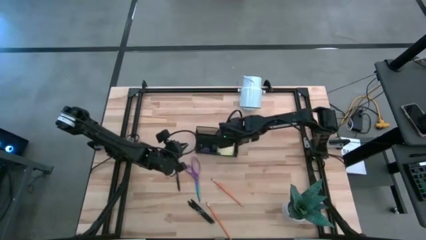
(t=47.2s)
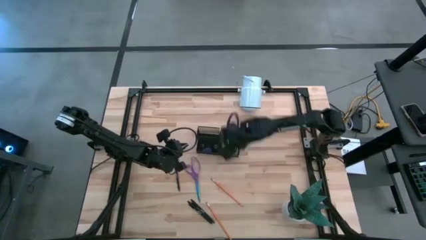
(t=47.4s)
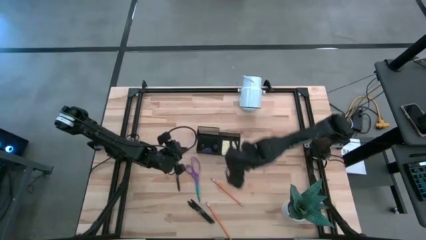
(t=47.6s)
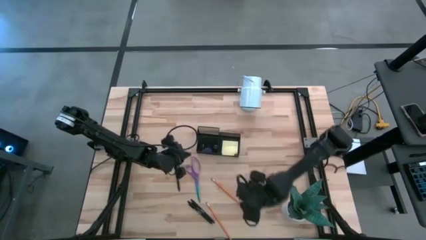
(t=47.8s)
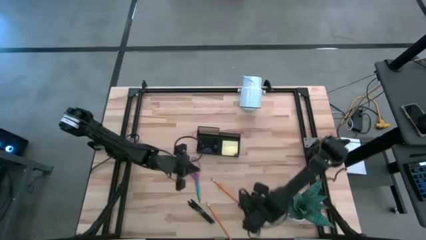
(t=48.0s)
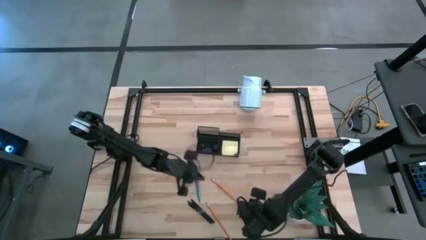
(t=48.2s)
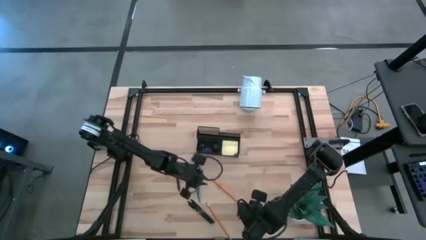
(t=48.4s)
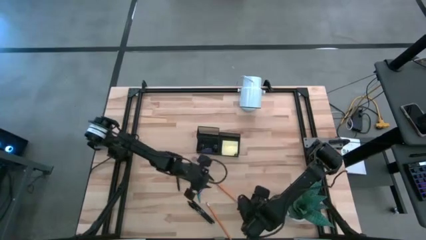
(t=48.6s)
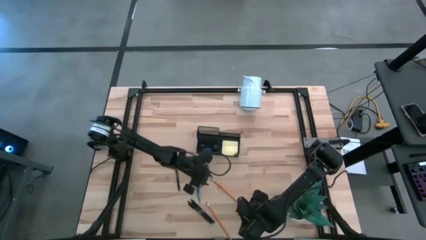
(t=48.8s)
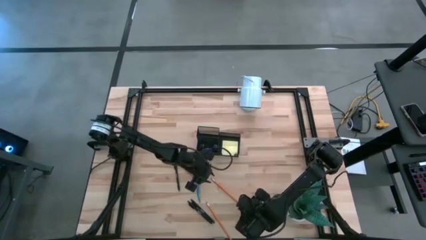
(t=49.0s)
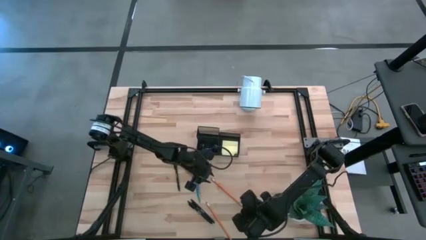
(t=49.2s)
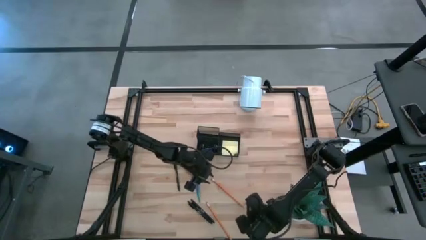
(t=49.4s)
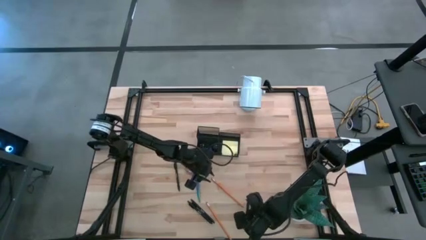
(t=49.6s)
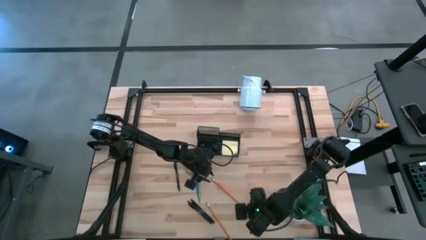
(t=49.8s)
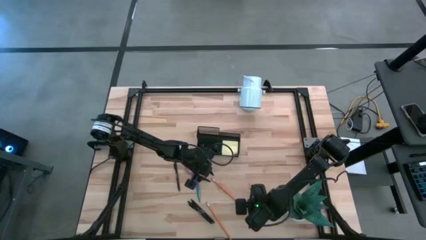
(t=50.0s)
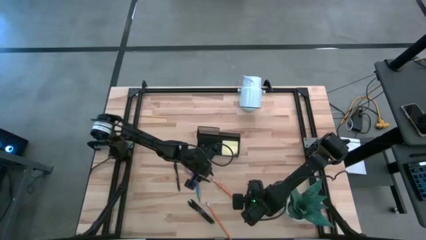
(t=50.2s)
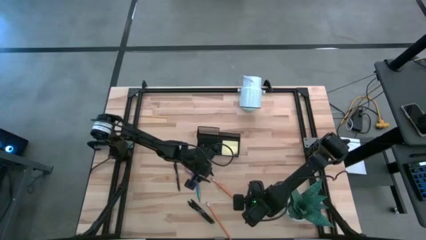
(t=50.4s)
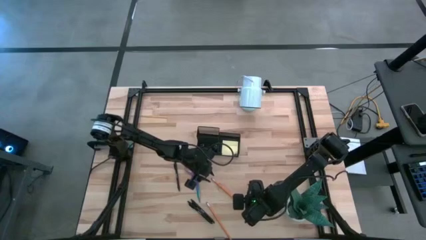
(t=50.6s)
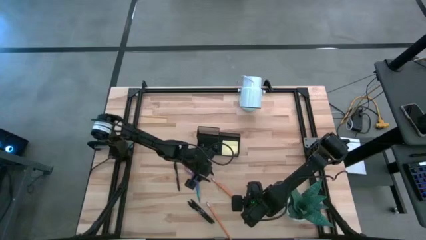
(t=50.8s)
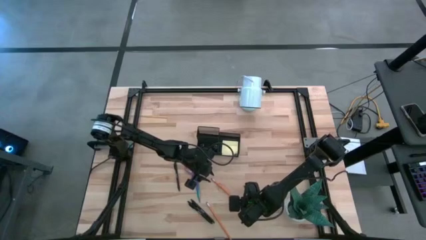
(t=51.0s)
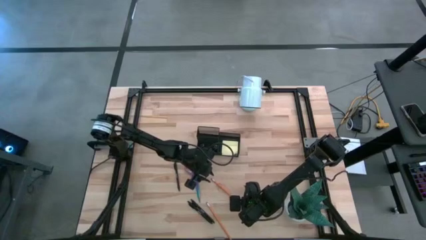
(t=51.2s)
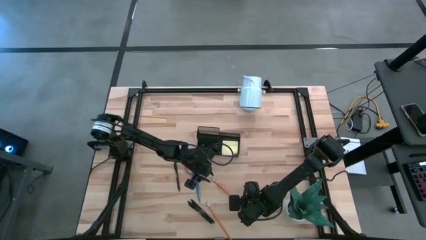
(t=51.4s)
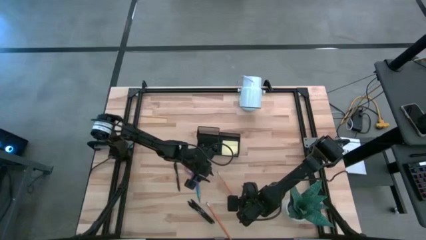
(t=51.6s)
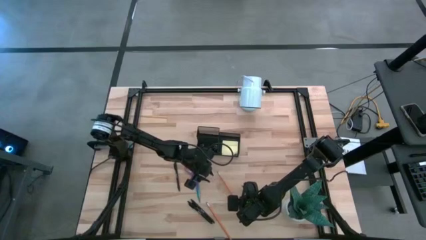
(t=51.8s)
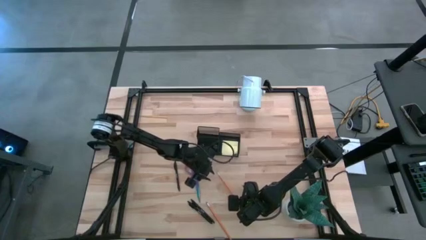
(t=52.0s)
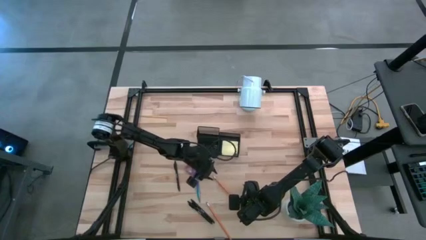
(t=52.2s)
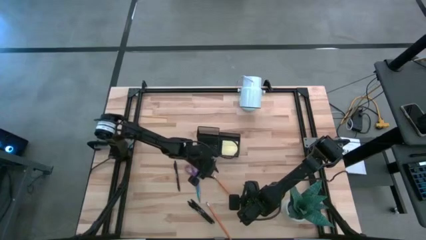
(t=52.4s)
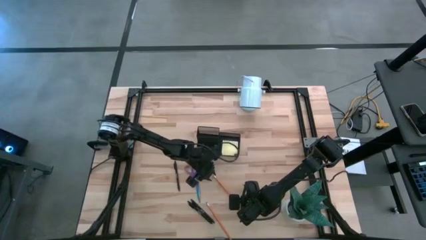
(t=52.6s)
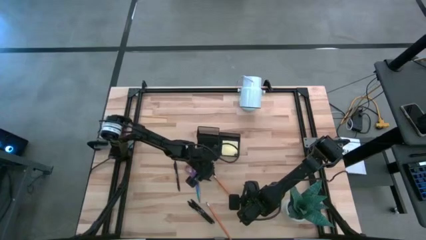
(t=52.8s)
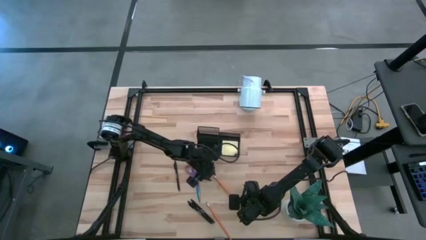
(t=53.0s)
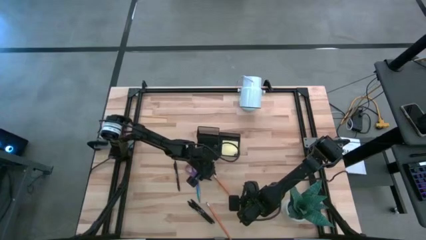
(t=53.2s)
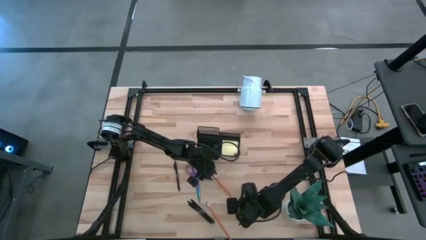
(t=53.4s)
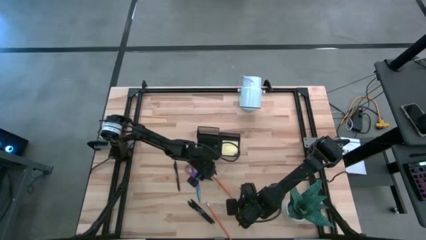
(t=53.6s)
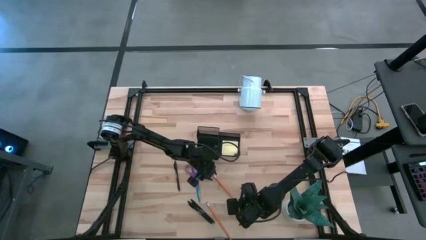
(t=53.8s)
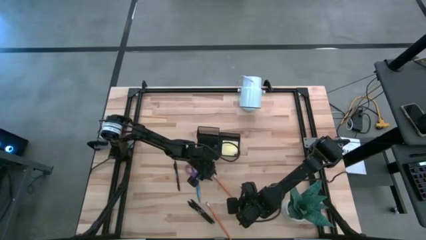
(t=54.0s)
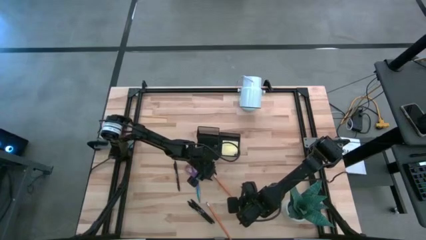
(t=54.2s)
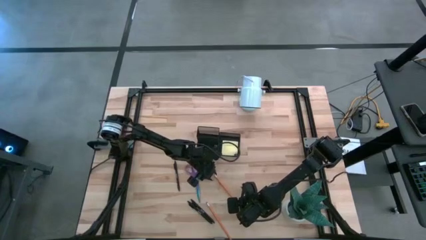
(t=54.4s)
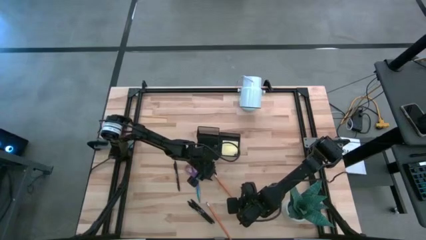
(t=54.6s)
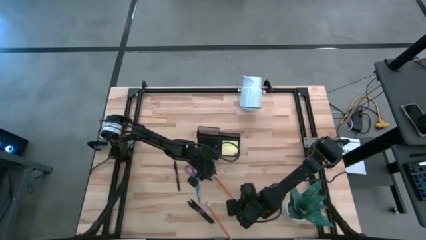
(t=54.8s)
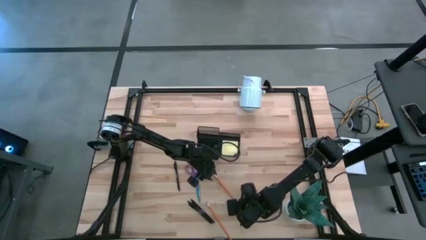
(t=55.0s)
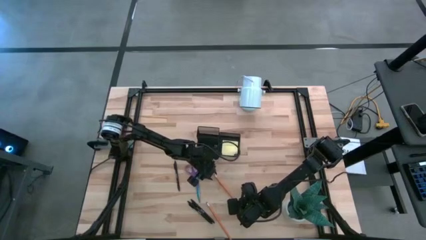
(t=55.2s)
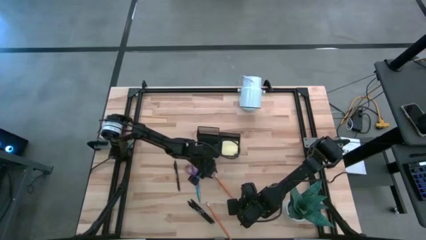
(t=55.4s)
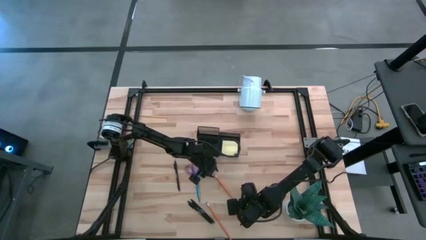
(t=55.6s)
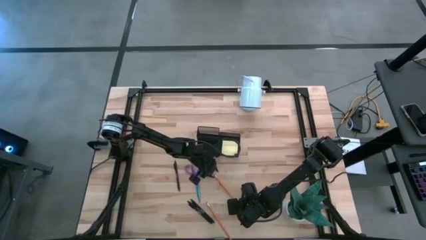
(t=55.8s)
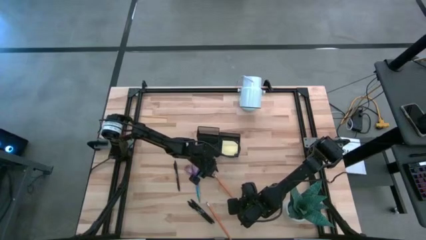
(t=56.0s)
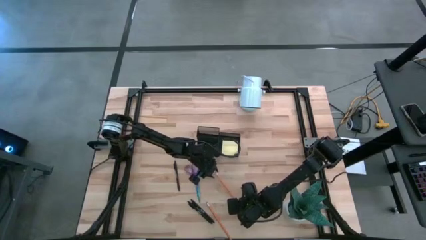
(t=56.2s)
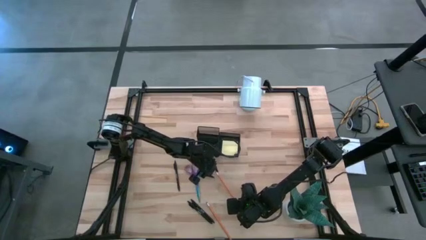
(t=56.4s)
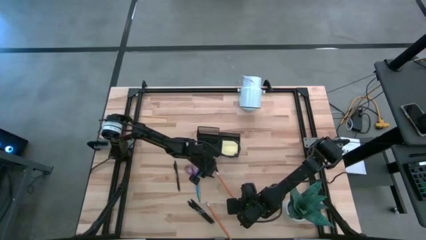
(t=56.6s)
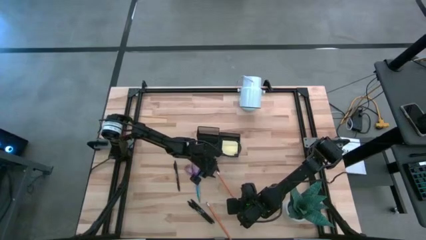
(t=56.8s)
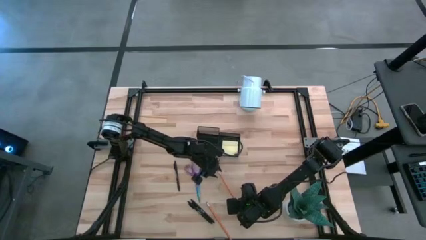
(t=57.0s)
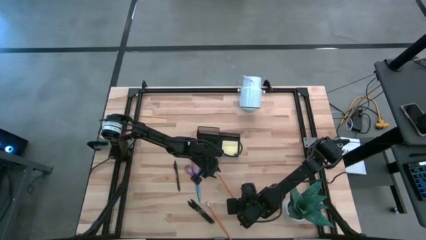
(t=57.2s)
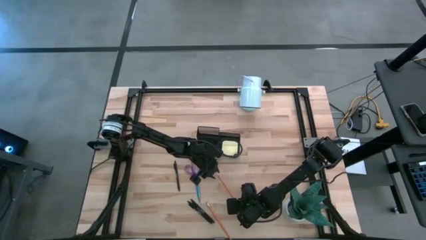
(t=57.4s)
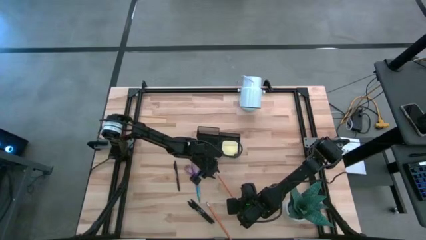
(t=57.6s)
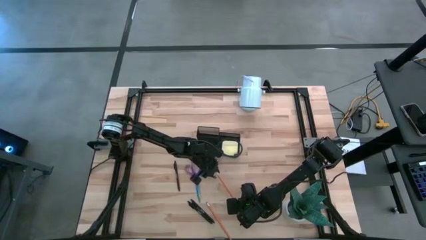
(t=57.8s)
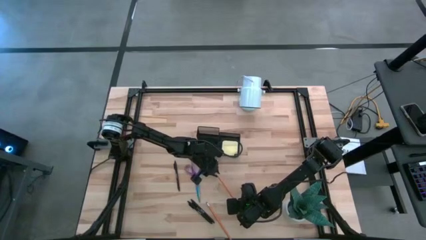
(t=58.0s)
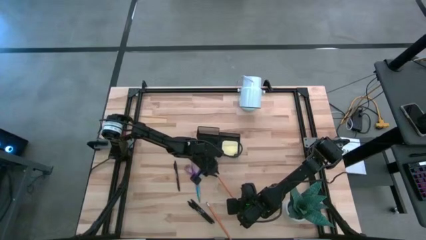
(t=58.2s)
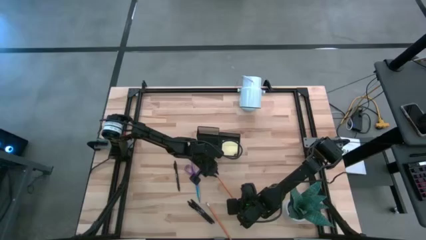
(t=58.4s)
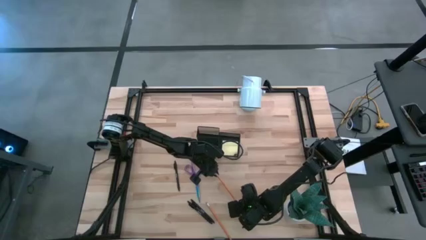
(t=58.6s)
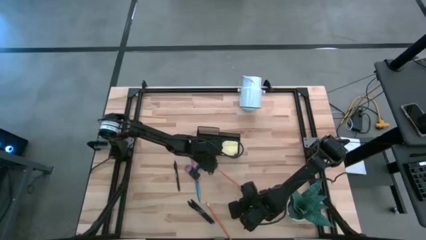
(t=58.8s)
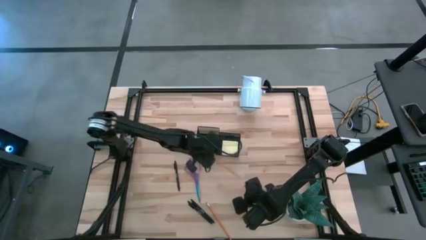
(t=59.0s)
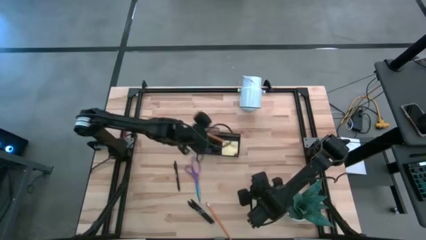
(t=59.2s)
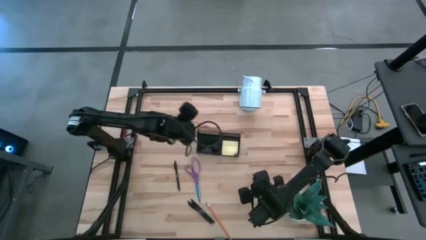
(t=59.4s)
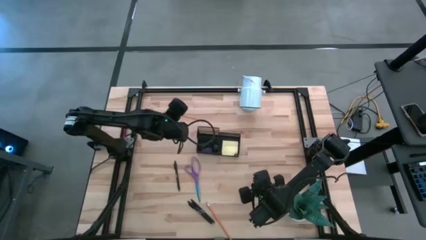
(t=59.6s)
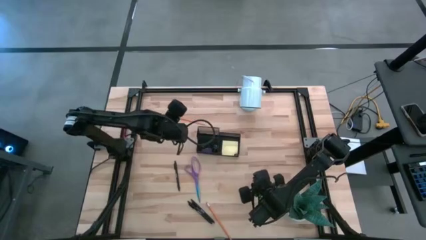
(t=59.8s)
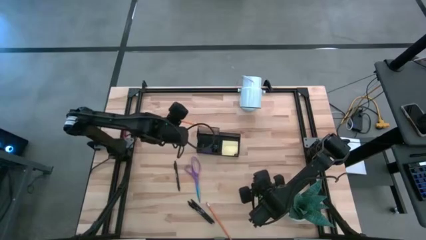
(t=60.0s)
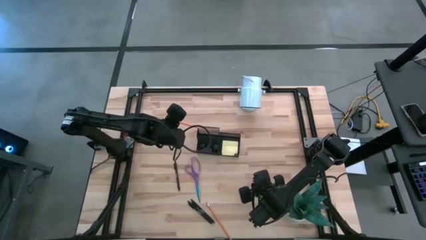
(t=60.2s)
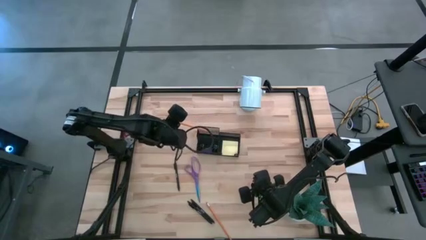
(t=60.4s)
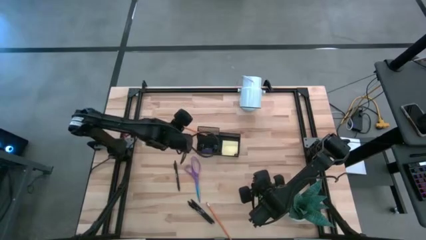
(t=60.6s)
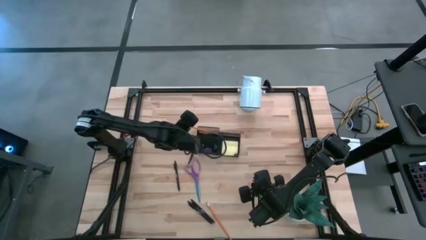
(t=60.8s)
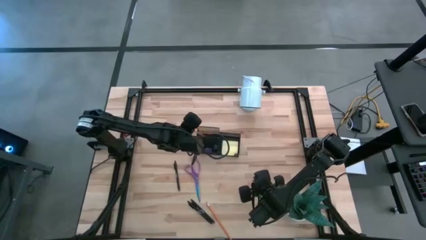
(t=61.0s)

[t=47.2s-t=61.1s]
Task: Pick and place office supplies into organizer
Put the top yellow pencil into the black desk organizer

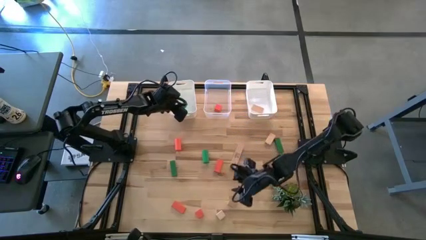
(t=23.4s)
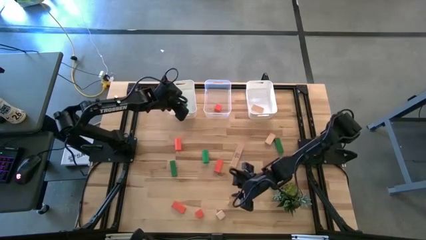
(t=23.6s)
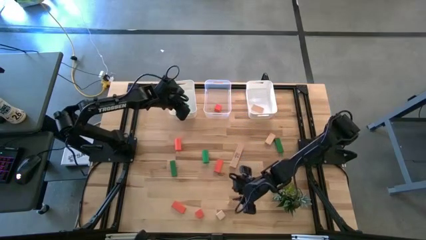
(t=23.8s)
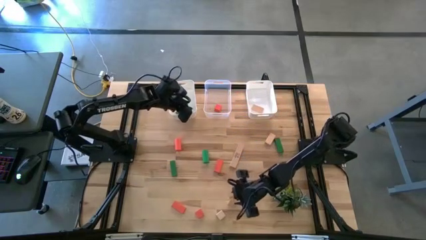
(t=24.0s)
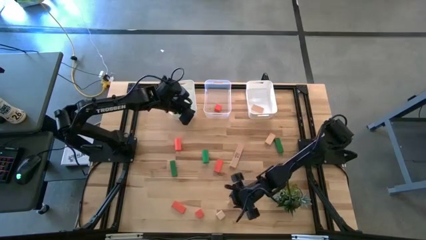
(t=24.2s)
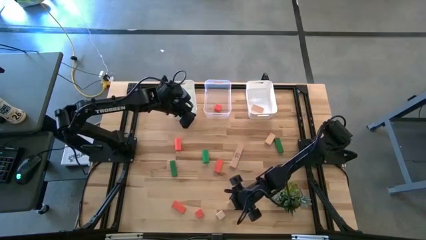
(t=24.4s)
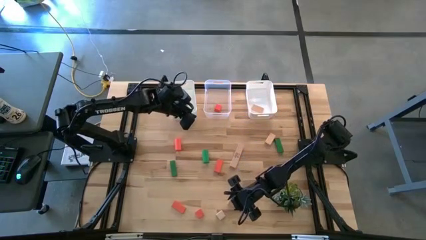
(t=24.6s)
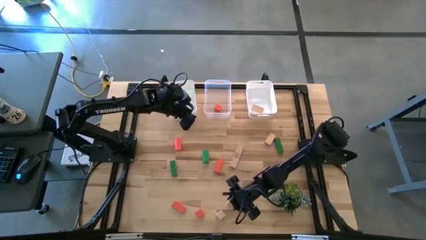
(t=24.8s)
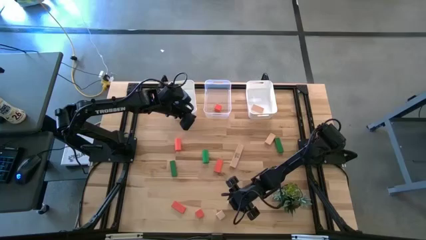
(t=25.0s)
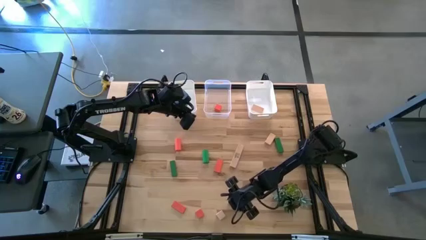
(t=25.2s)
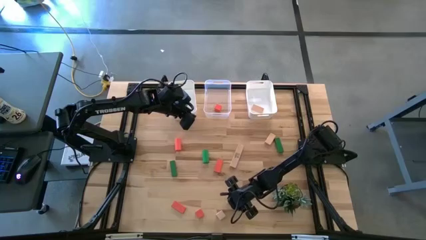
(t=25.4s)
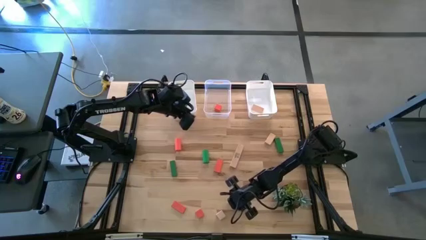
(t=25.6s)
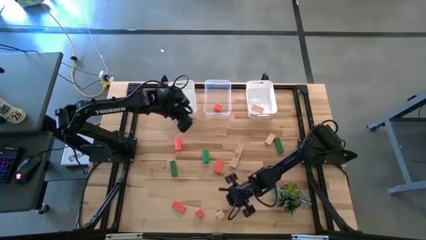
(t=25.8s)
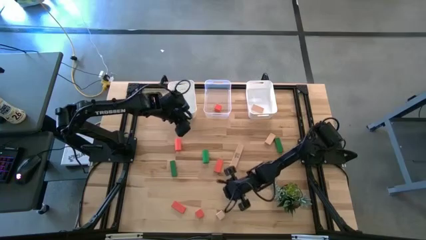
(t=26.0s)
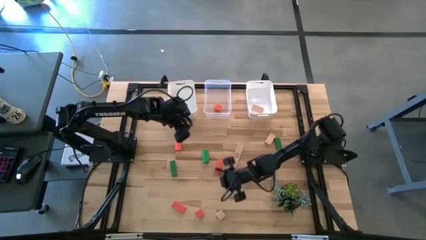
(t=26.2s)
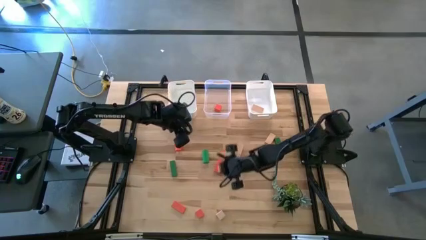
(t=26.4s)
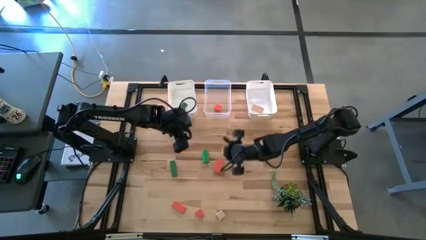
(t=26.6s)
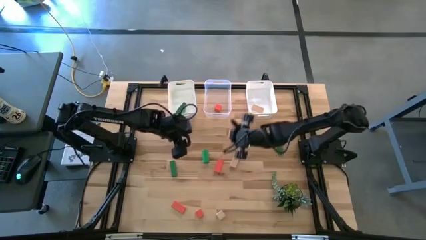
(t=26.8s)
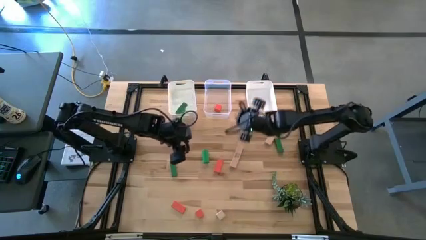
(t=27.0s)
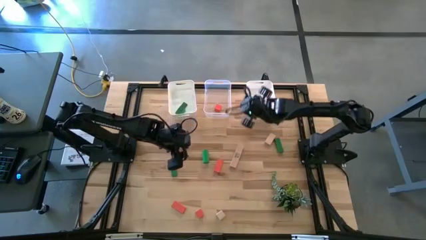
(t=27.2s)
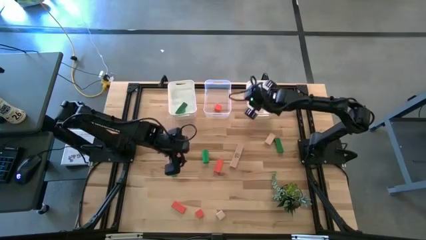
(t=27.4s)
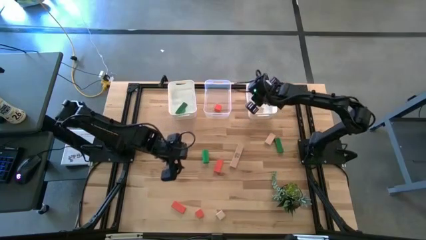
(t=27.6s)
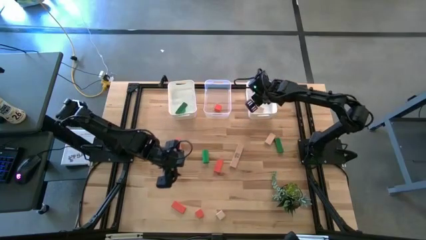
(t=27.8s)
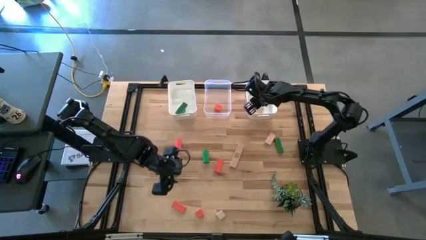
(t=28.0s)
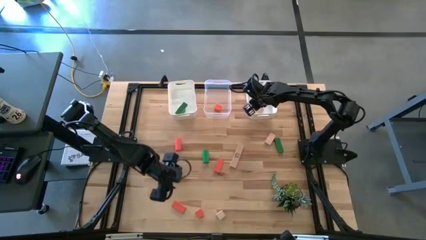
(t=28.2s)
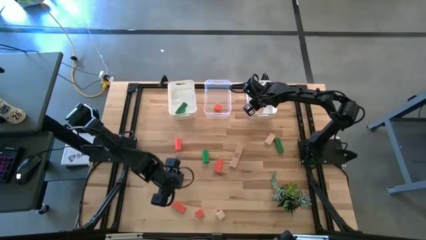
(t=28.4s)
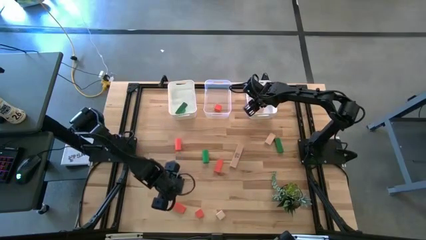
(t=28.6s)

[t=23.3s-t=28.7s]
Task: Sort & place blocks by color
Put the brown block into the right white bin
